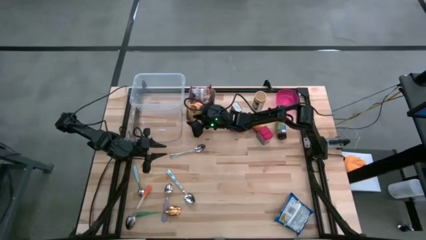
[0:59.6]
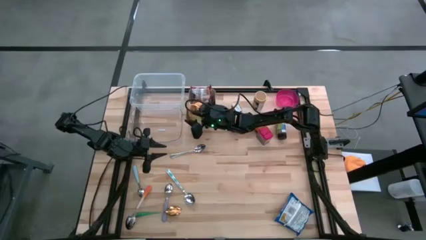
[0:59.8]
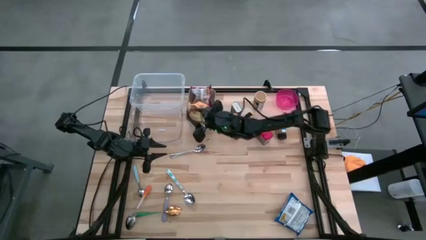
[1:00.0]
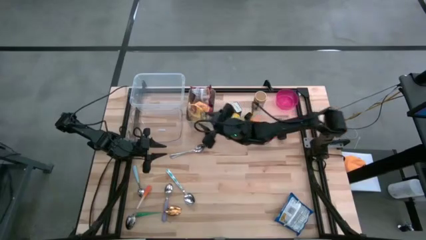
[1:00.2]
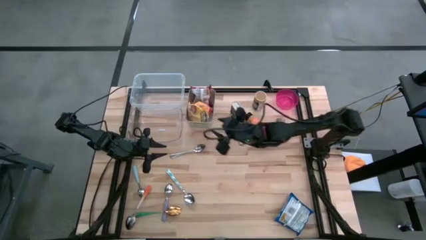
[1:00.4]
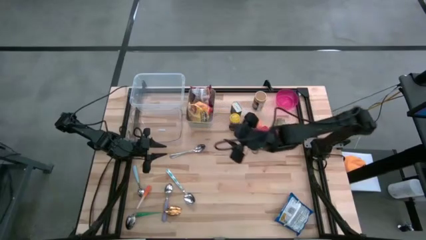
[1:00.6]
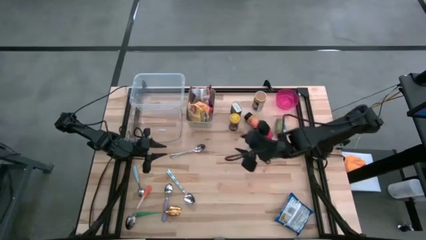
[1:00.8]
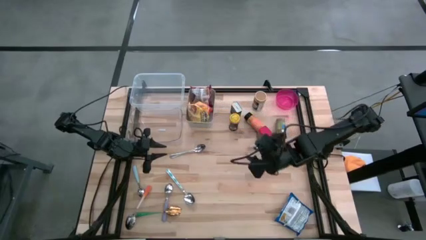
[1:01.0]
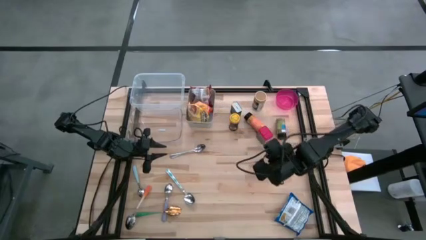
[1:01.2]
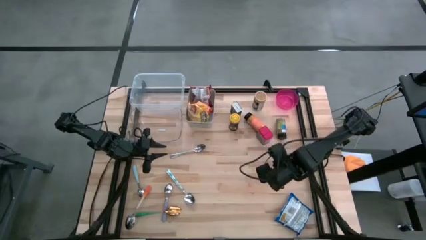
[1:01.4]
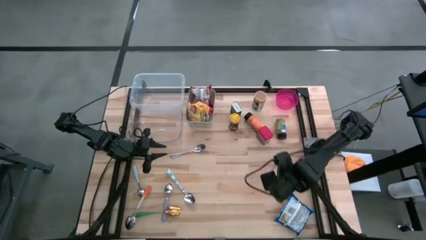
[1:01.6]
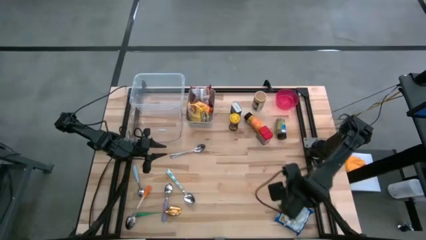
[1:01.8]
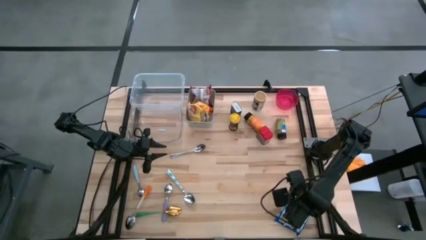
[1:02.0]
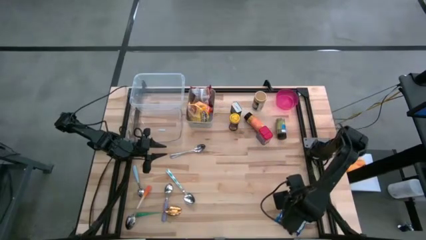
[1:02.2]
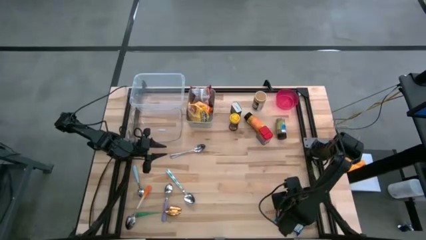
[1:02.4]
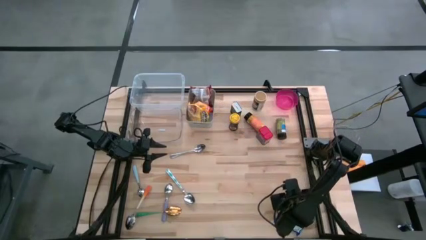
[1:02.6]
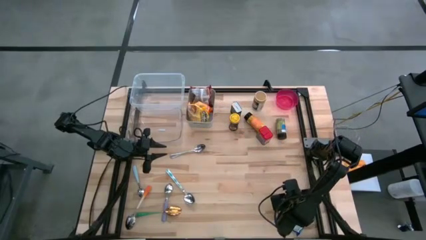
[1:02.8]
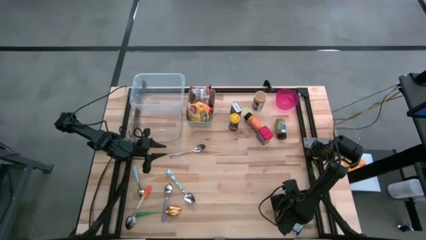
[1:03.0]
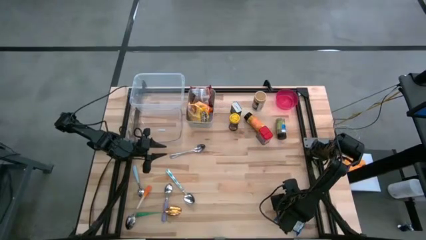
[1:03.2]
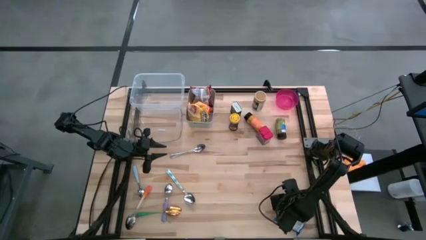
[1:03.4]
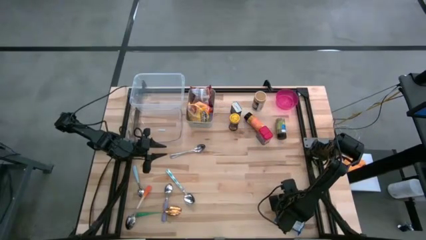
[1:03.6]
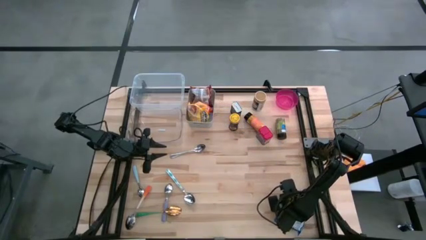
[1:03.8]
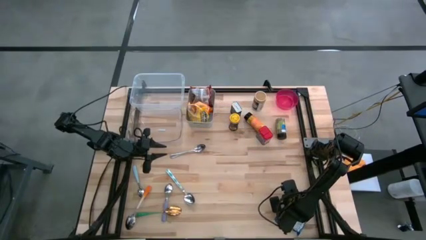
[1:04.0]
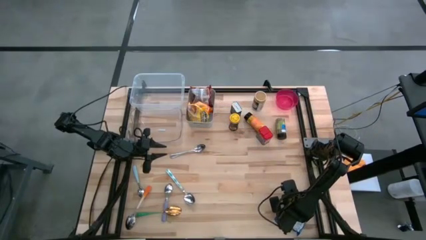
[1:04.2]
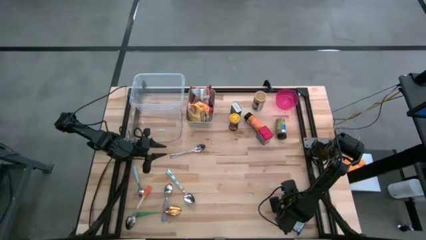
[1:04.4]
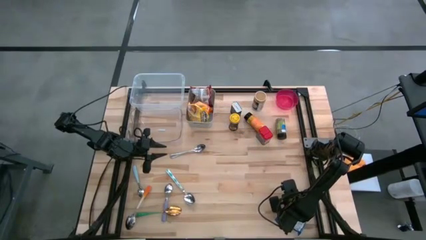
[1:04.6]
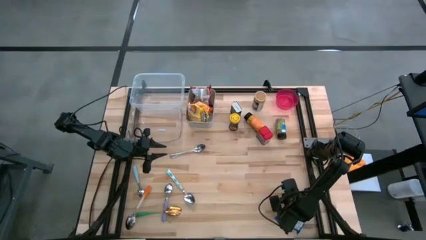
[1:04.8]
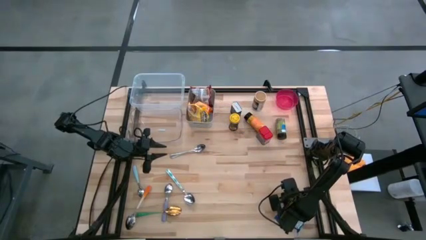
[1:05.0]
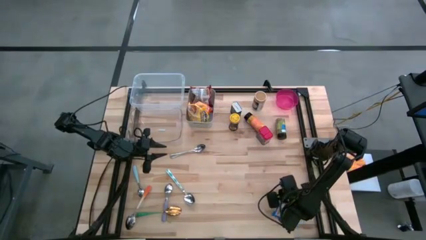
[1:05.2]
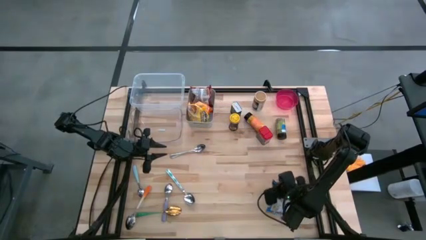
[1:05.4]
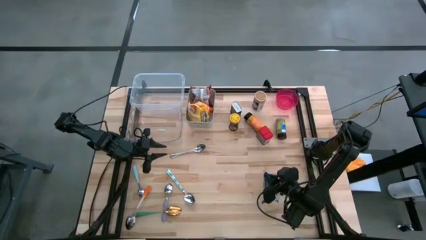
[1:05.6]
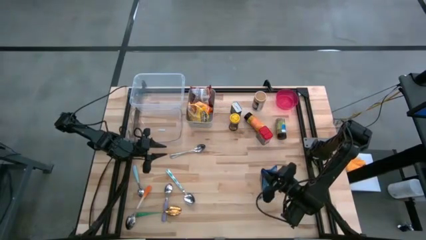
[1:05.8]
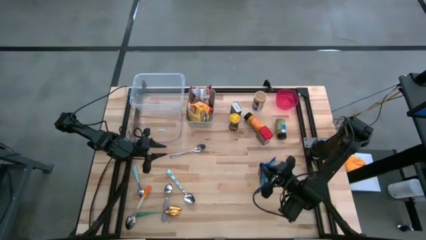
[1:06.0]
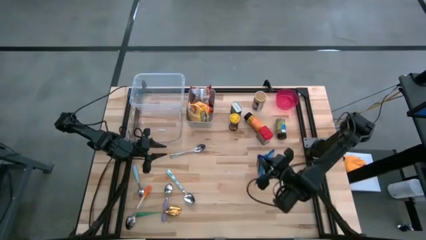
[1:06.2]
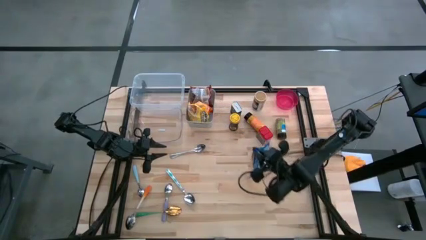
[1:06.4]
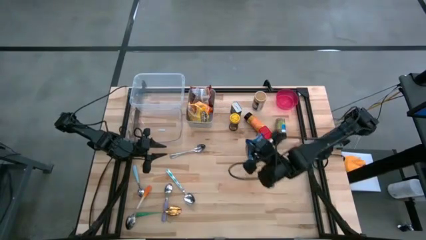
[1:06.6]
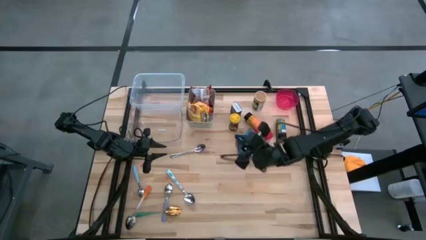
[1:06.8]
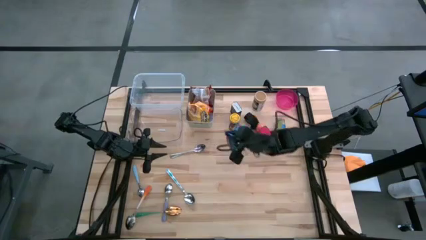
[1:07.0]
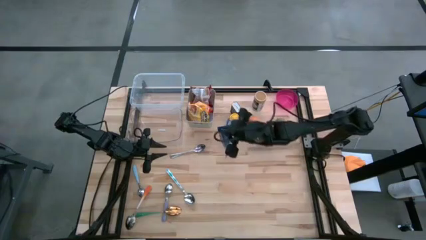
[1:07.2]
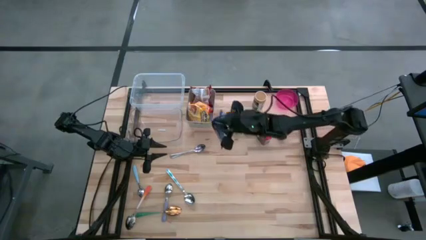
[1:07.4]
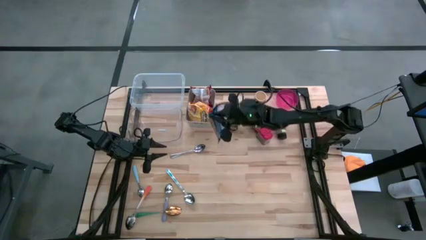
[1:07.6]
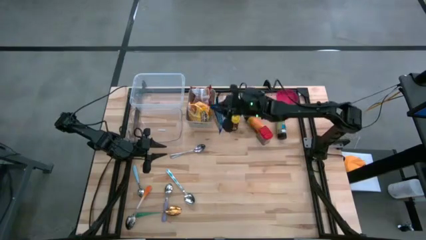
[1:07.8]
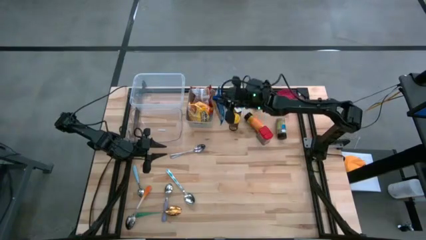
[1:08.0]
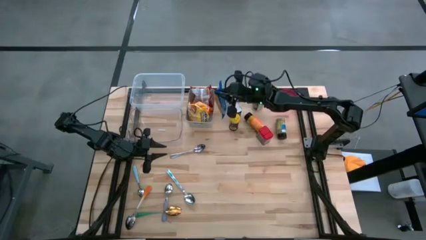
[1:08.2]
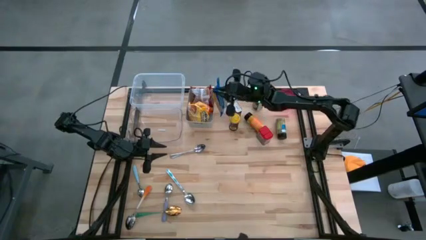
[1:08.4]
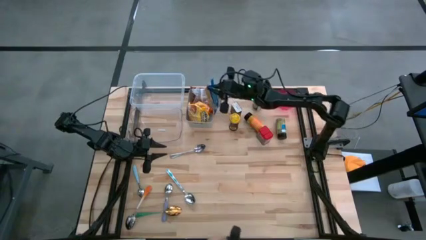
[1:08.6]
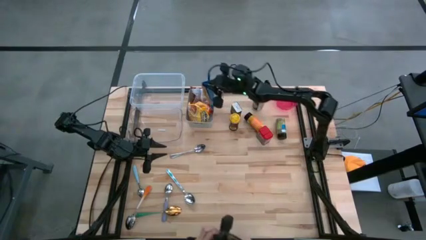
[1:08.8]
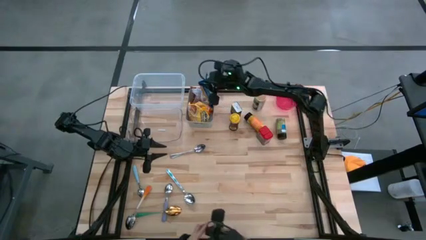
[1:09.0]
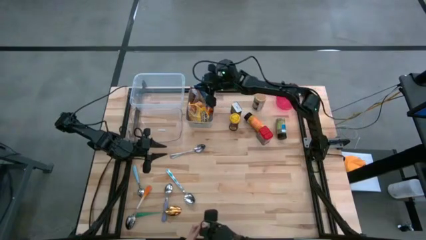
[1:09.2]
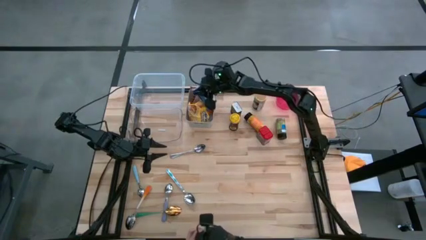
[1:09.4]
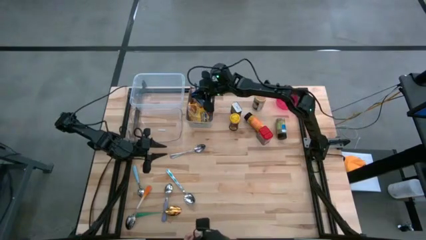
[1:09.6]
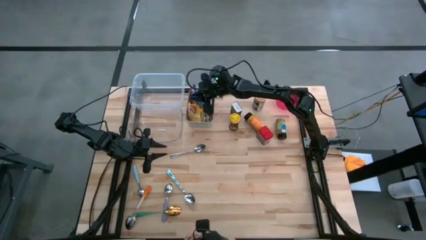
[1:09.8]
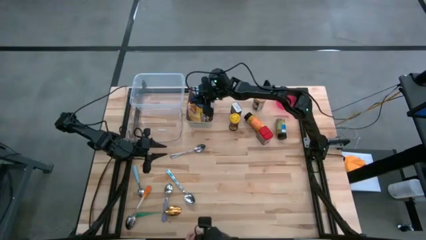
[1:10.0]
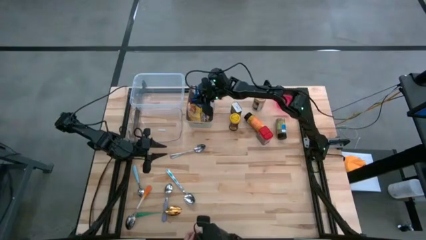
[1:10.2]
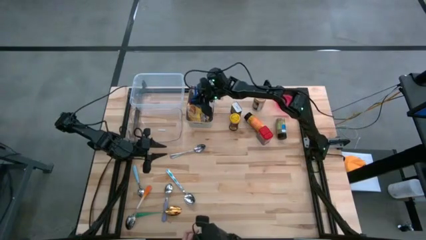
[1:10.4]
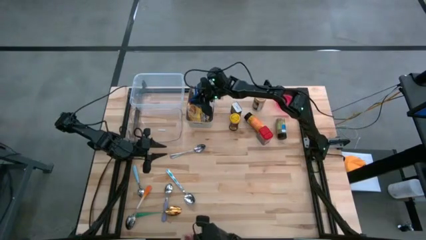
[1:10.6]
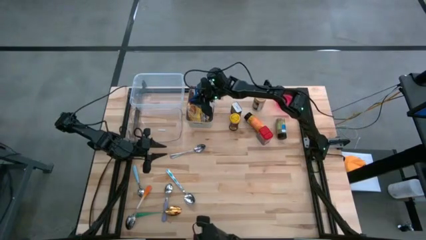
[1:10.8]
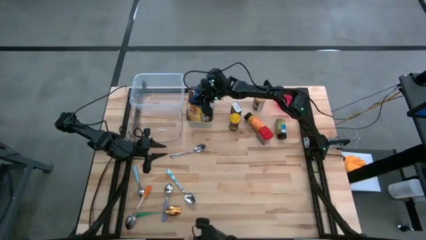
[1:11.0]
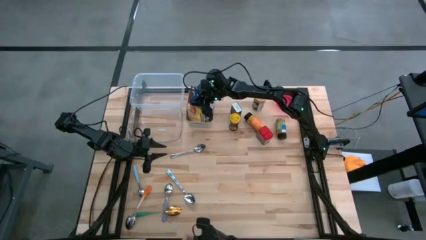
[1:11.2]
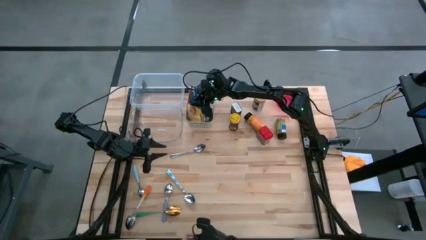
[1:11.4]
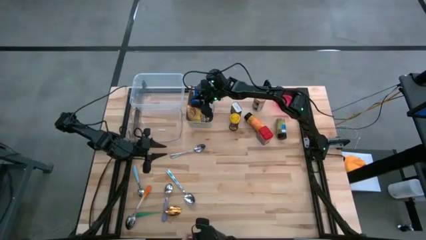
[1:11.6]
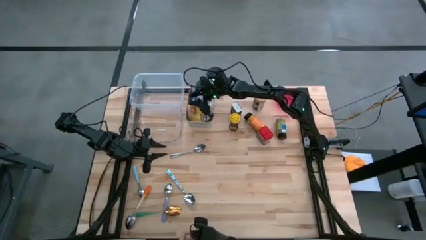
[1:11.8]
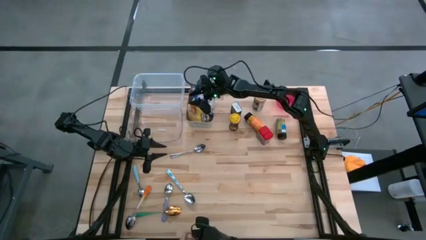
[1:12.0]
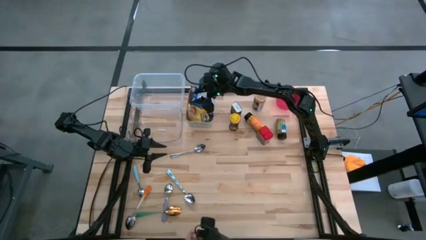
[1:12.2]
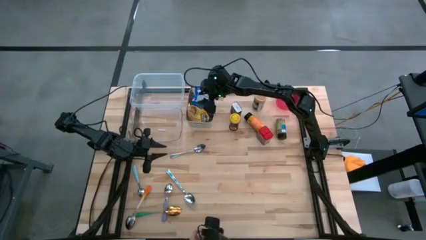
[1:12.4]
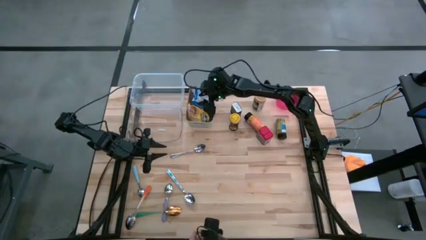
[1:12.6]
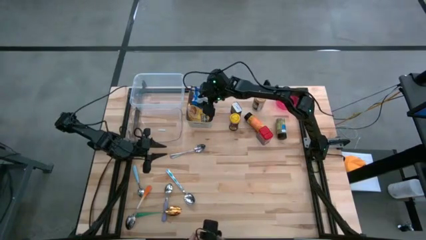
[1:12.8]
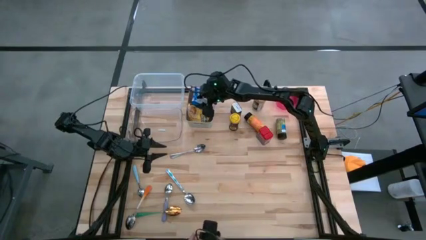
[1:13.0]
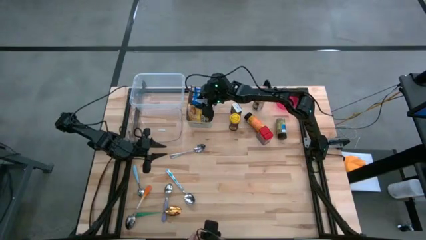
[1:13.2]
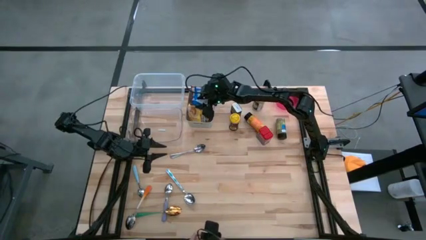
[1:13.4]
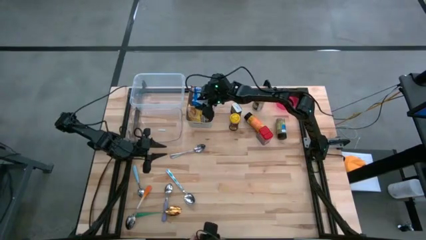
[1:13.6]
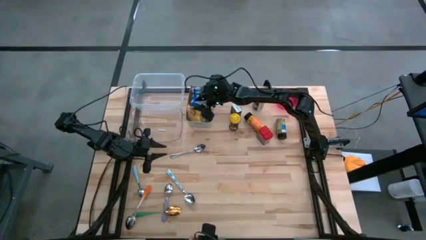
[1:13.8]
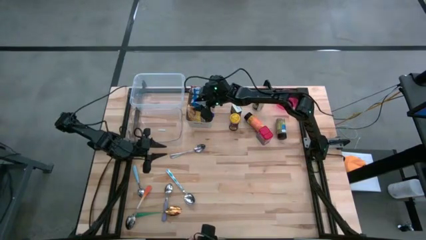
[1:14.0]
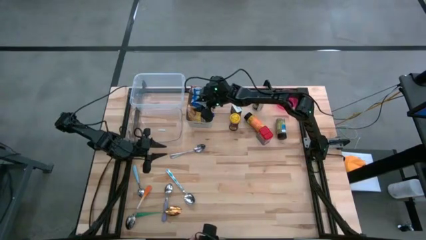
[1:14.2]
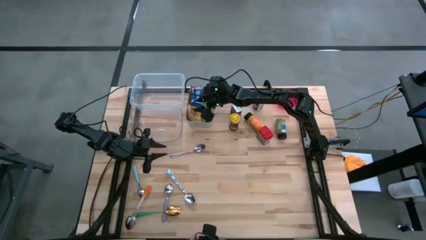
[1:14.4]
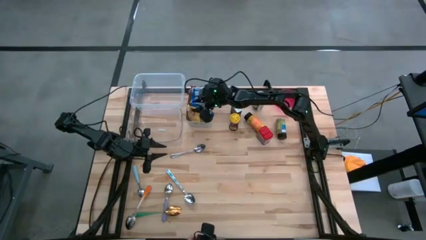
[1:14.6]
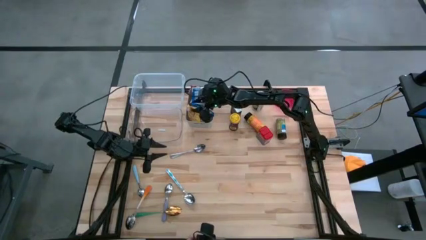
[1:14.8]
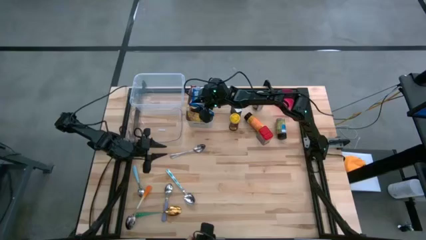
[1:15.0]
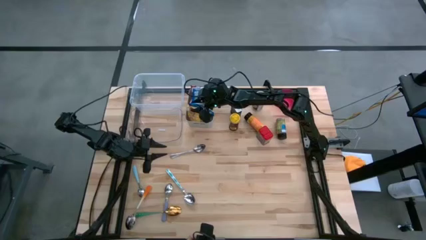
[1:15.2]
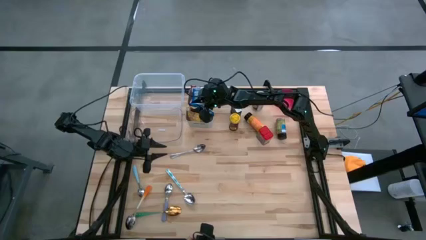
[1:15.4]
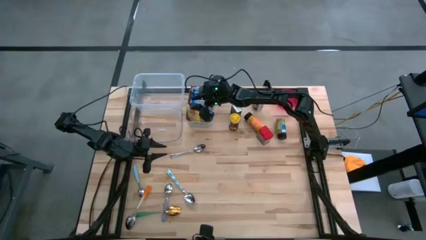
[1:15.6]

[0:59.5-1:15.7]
Put the blue noodle pack into the gray bin
